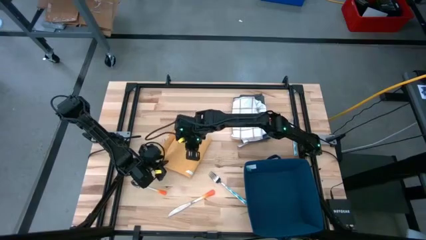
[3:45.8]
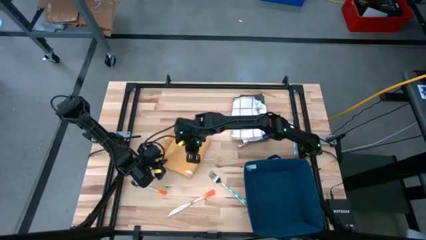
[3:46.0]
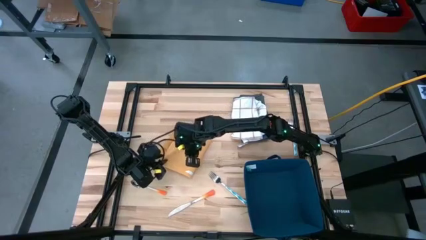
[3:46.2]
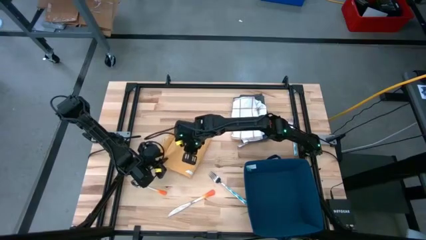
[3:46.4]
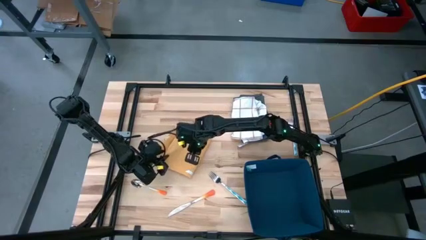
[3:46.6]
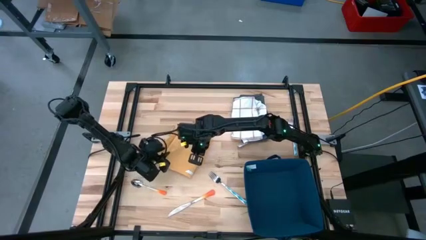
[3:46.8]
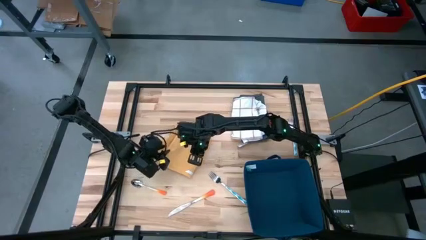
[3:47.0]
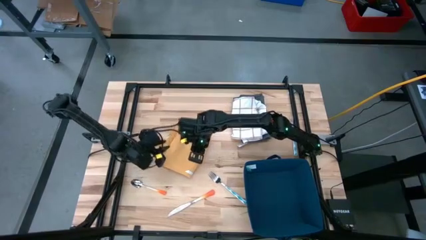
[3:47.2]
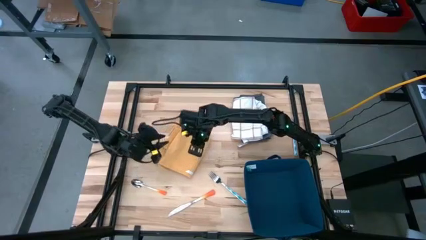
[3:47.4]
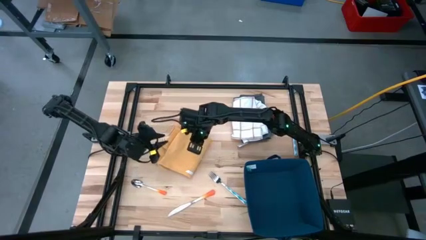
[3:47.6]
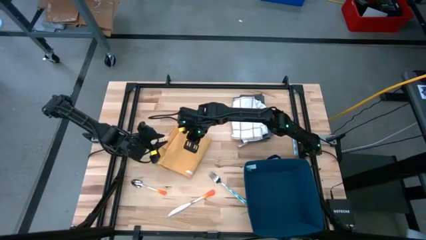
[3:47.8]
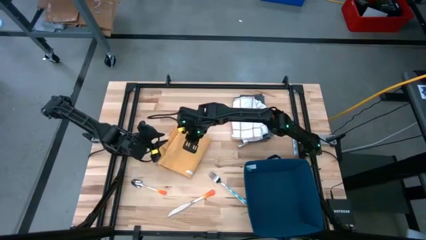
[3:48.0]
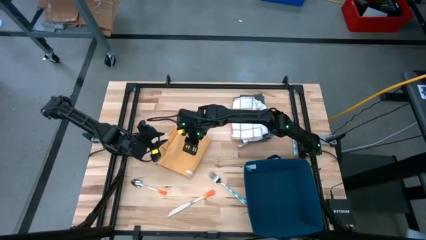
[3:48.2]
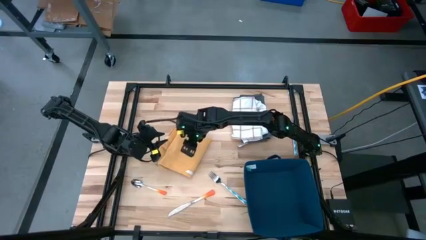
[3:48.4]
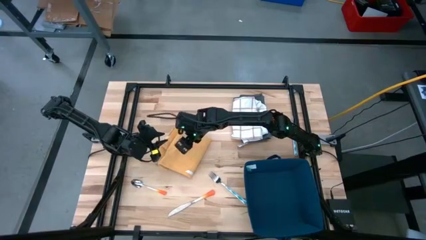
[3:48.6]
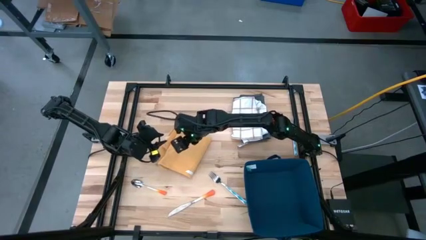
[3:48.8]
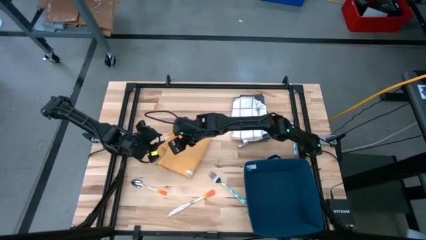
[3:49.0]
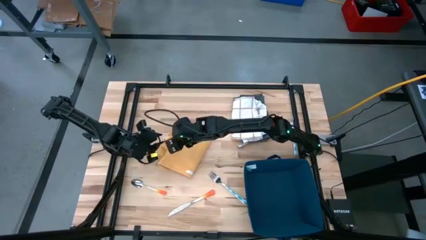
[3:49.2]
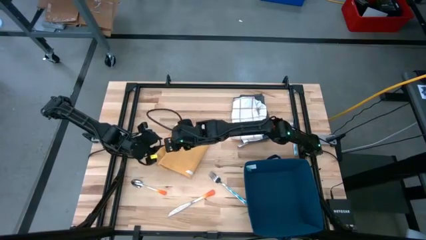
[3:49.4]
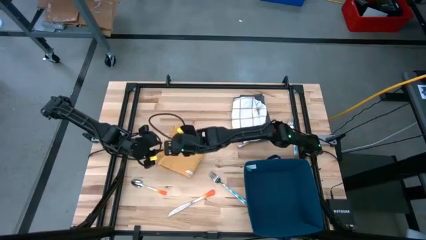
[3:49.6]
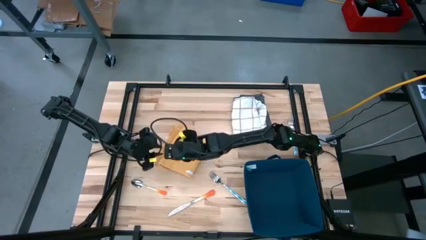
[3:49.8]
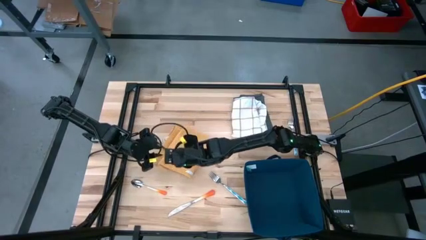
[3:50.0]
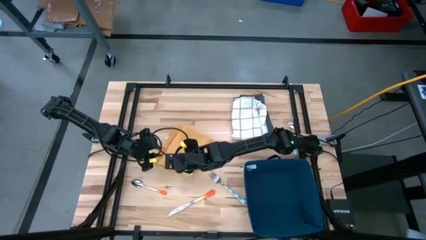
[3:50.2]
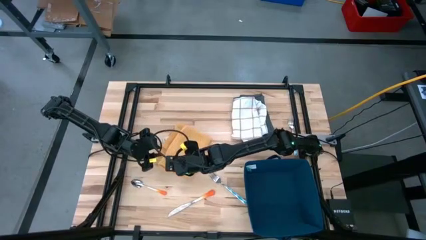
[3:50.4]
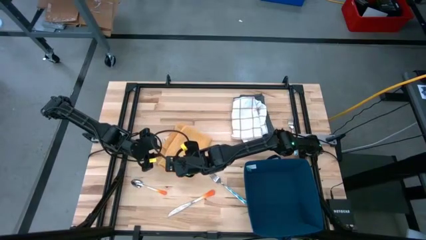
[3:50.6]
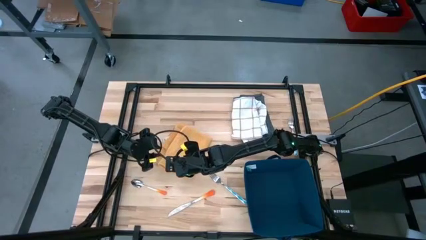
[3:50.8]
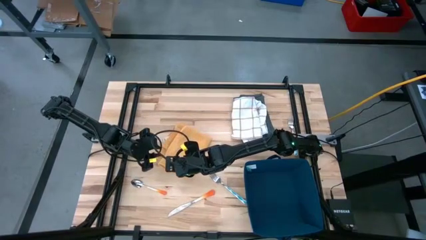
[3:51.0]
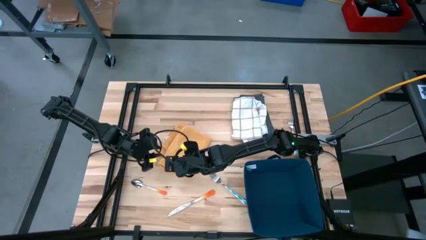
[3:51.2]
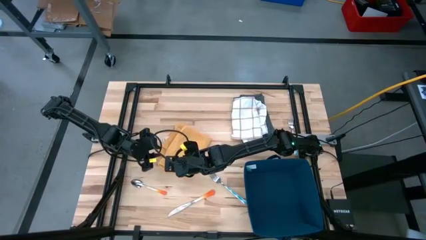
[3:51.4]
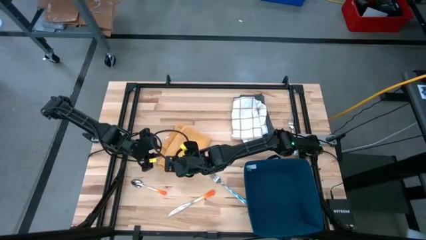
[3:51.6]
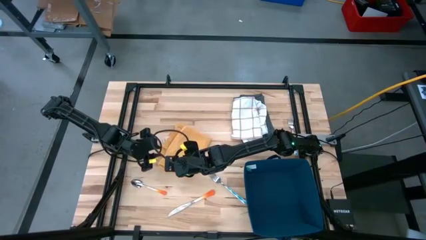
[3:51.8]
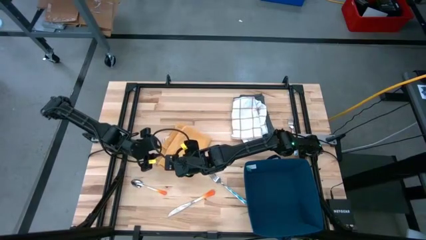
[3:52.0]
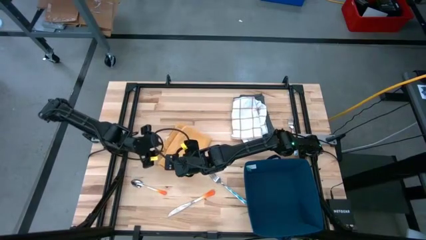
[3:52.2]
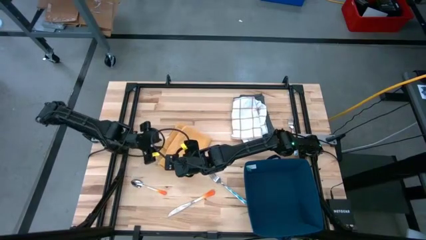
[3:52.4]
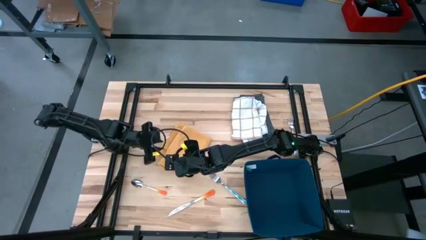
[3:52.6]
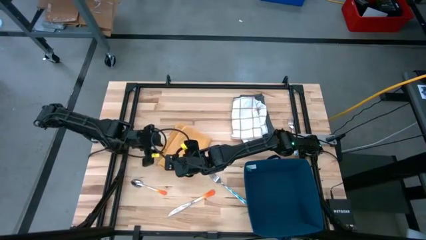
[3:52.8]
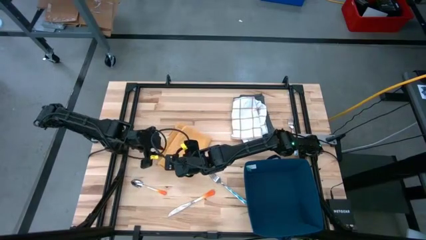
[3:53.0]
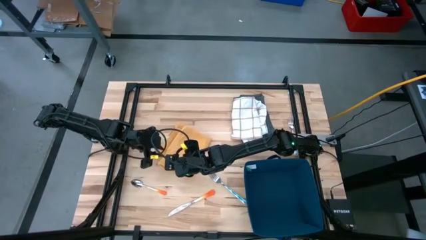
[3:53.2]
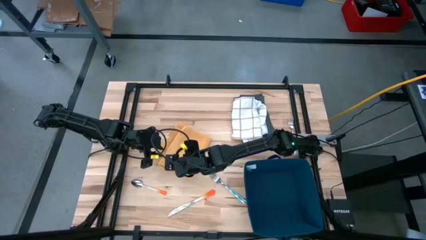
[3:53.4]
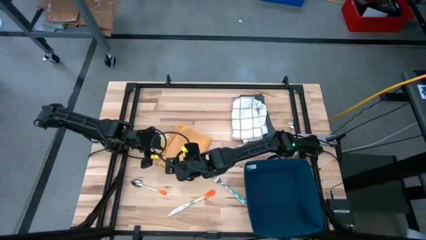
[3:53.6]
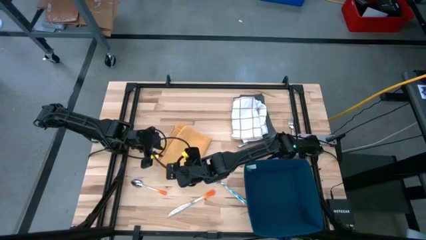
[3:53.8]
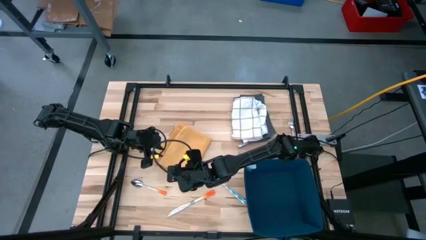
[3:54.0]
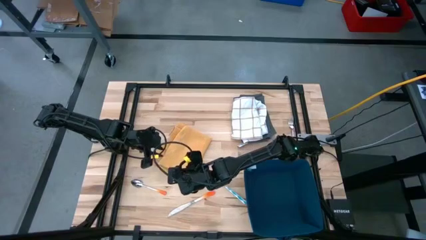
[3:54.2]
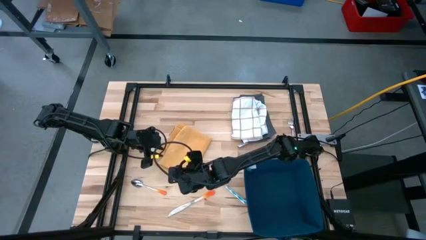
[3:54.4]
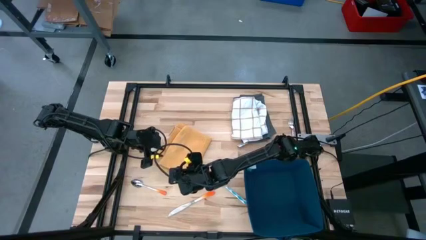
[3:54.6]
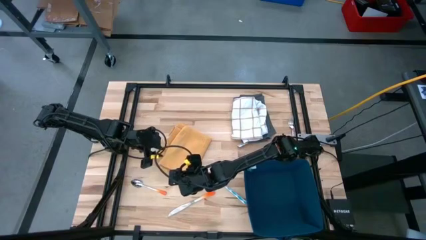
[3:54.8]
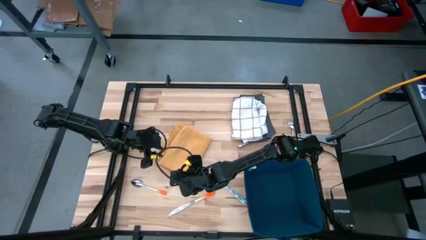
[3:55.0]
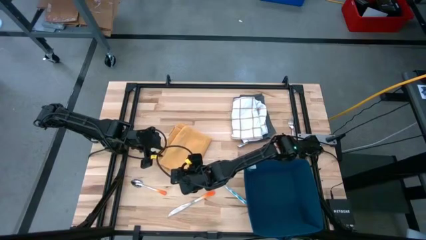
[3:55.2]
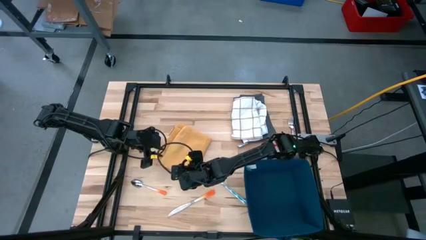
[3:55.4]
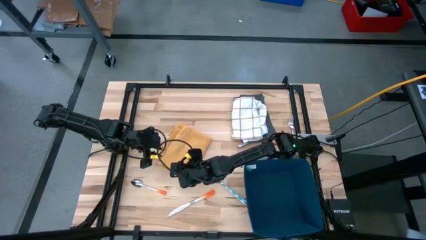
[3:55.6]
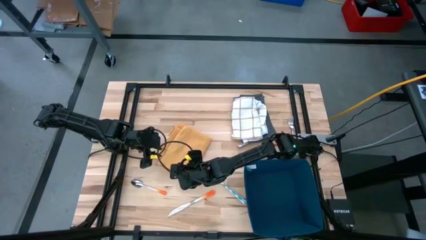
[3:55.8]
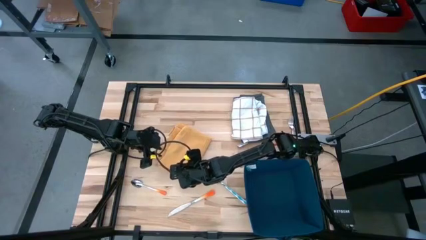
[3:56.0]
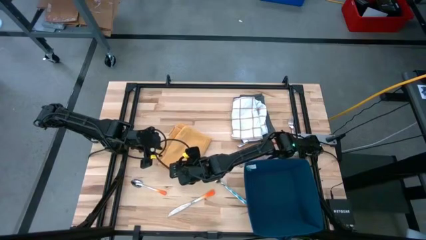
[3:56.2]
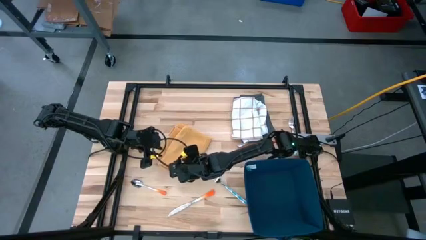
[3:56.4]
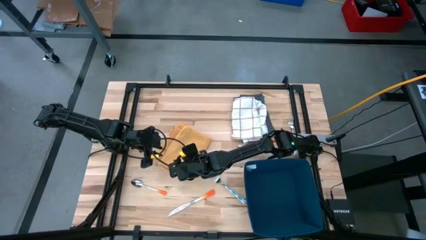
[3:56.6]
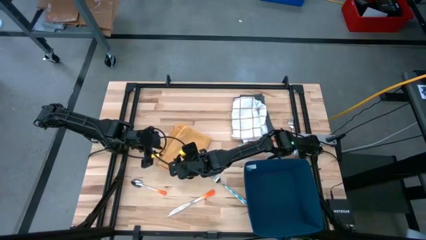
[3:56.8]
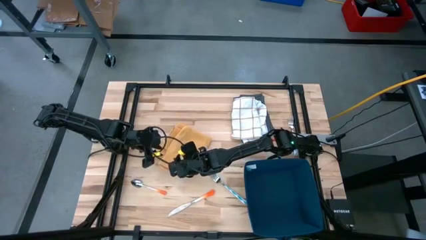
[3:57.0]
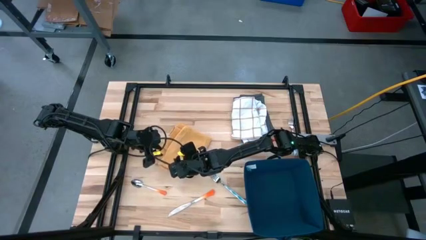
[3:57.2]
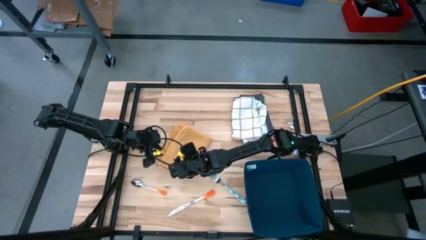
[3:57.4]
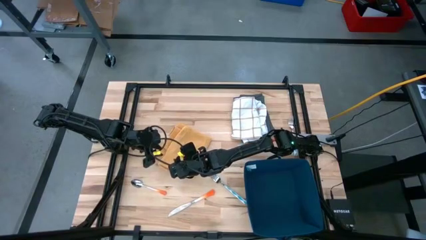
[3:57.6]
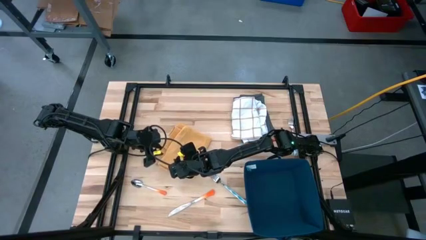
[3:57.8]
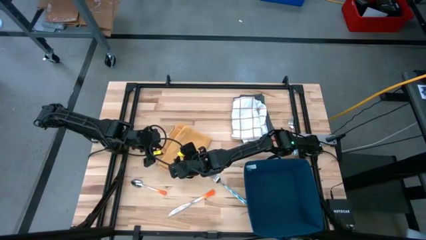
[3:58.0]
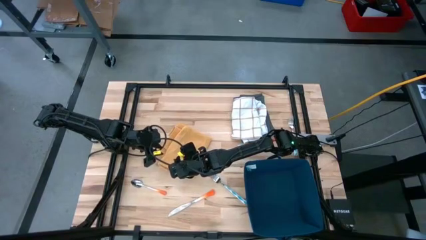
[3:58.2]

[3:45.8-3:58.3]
Task: Fold towel
Stack the orange towel on top of the white towel

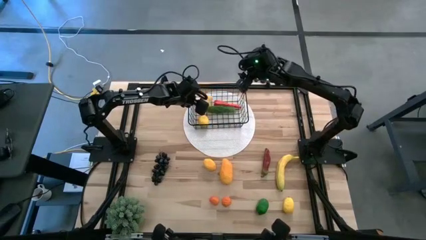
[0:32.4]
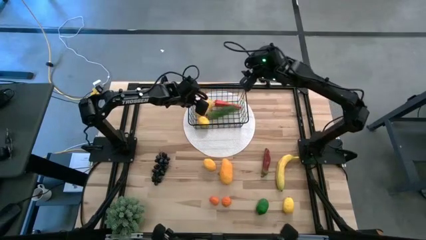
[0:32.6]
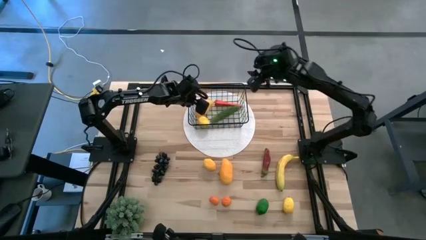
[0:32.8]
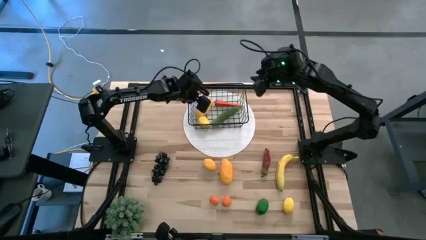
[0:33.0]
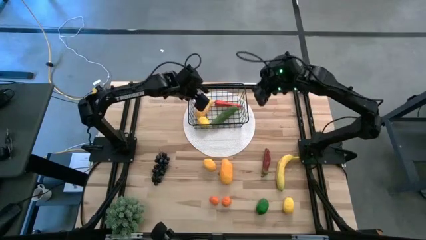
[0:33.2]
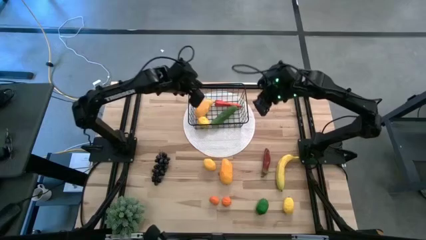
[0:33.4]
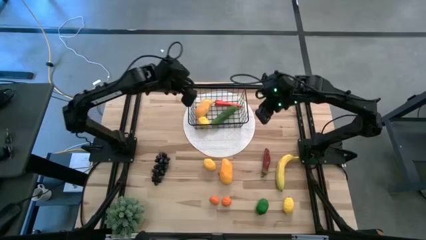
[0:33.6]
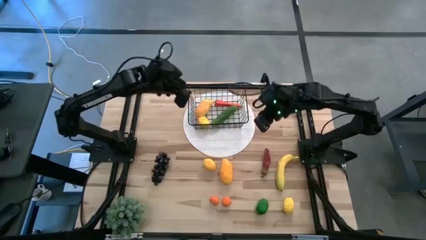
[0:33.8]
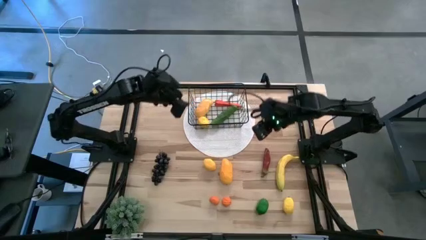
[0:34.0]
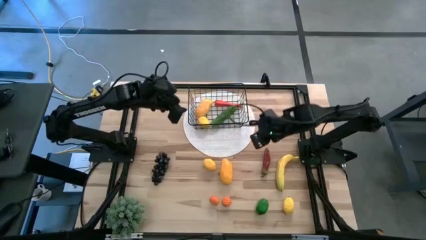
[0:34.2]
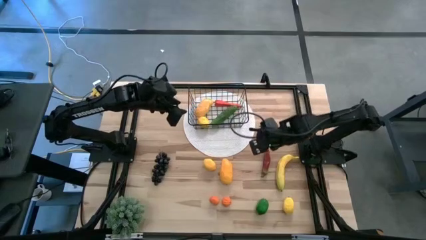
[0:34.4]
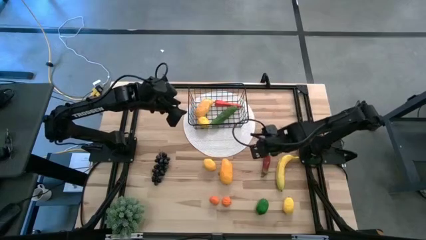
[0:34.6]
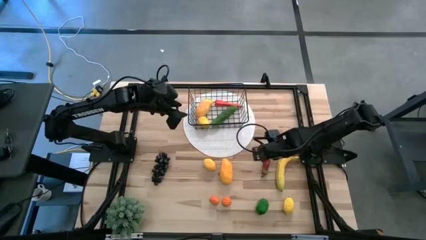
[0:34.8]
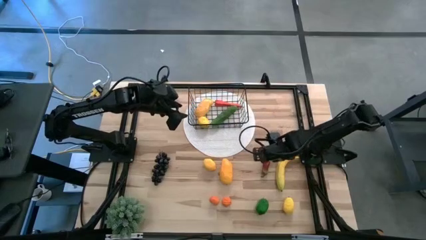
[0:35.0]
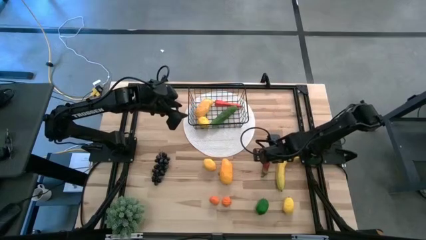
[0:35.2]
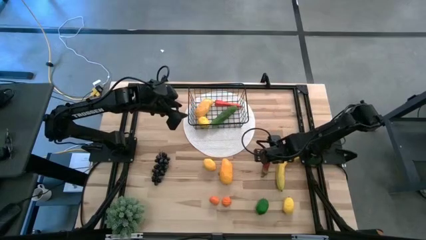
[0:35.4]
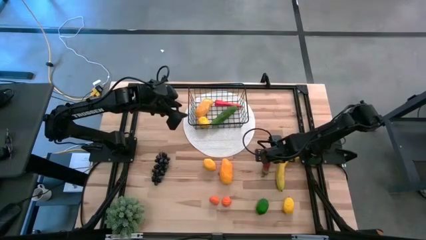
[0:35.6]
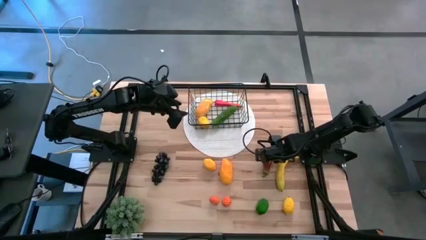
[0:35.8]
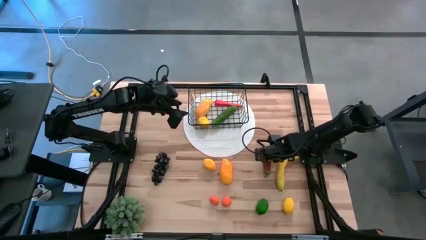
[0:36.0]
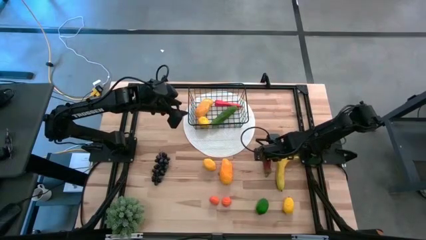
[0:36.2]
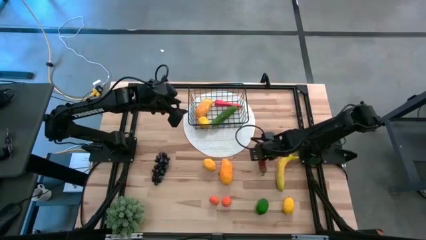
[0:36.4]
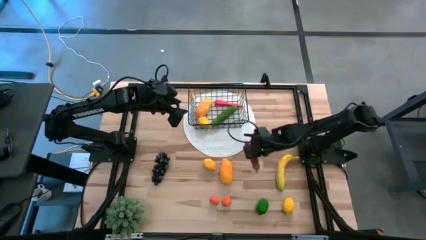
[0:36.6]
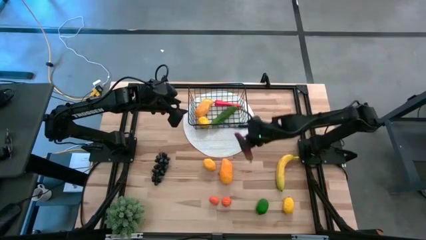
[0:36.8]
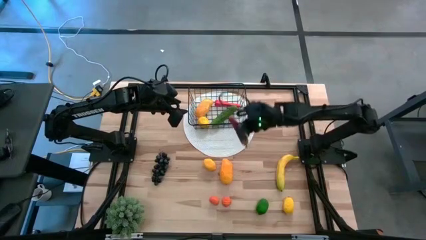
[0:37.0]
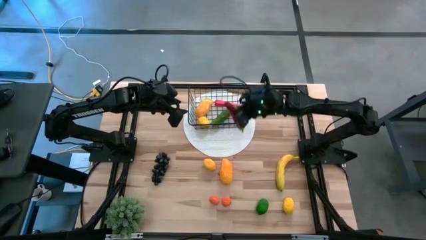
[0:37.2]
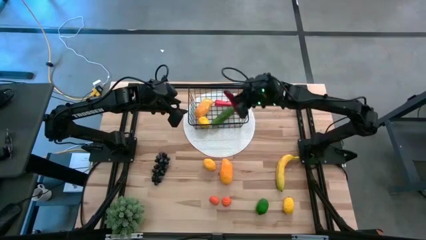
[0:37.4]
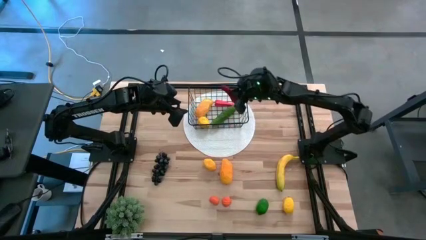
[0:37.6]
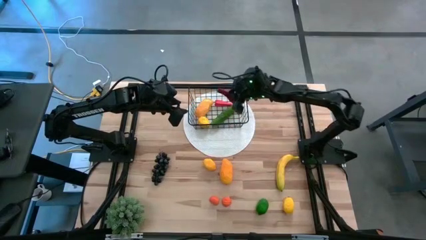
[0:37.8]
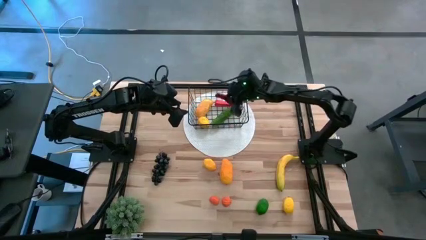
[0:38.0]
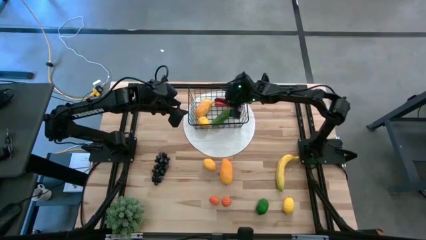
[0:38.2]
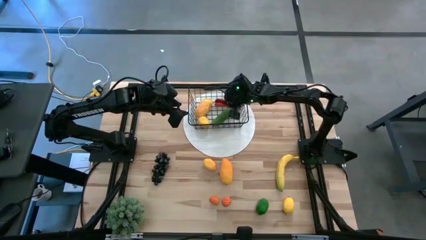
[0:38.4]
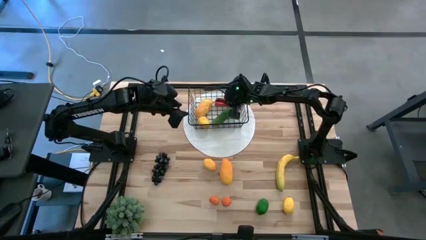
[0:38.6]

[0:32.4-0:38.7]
Task: Build produce basket
Put the red pepper into the black basket
